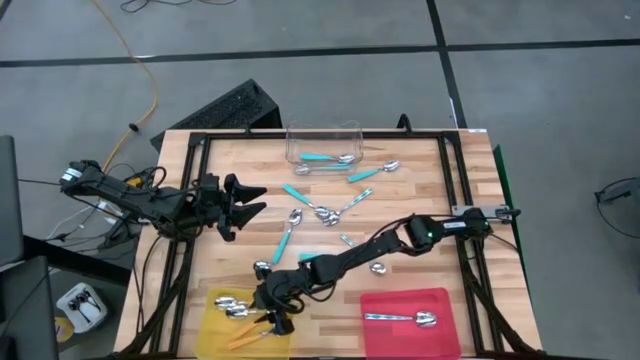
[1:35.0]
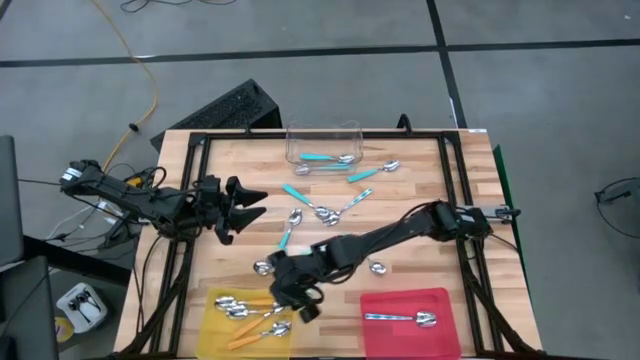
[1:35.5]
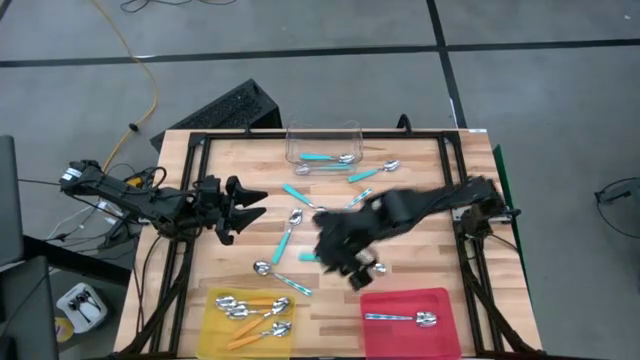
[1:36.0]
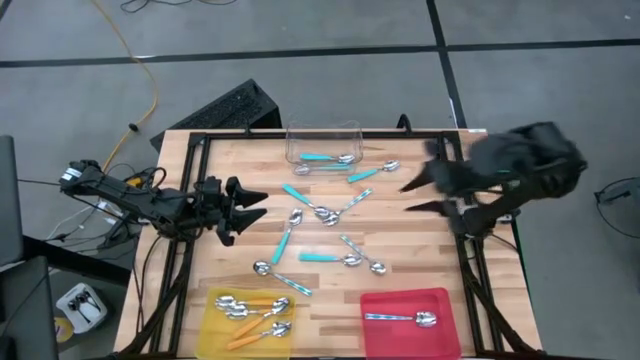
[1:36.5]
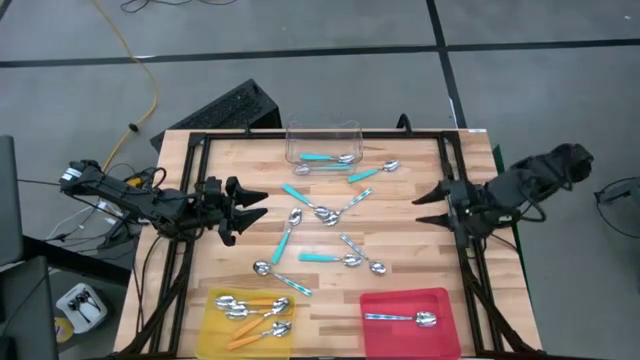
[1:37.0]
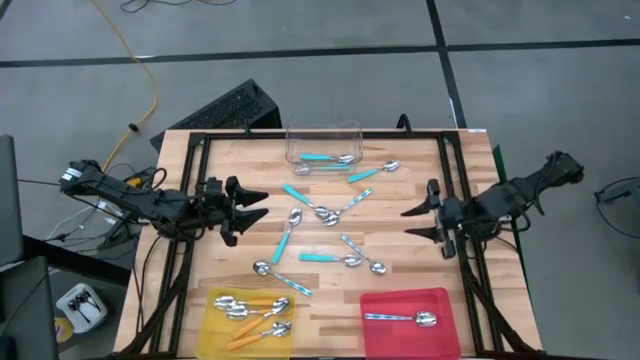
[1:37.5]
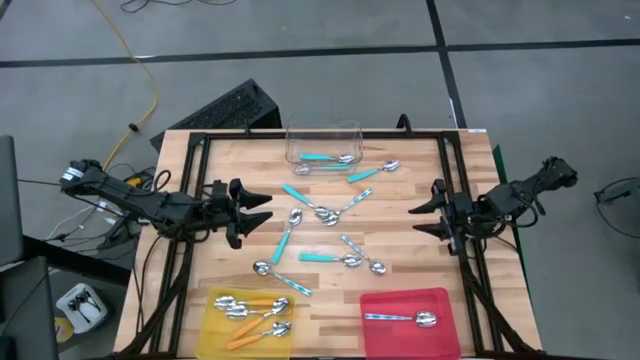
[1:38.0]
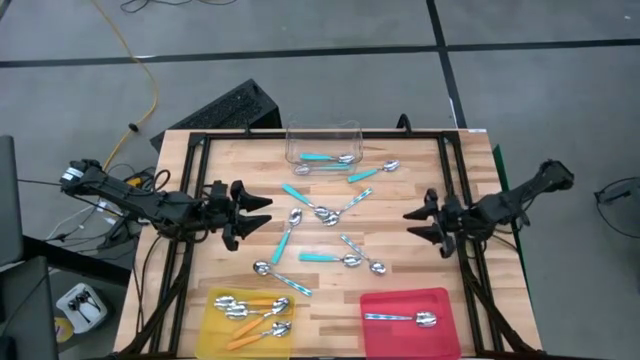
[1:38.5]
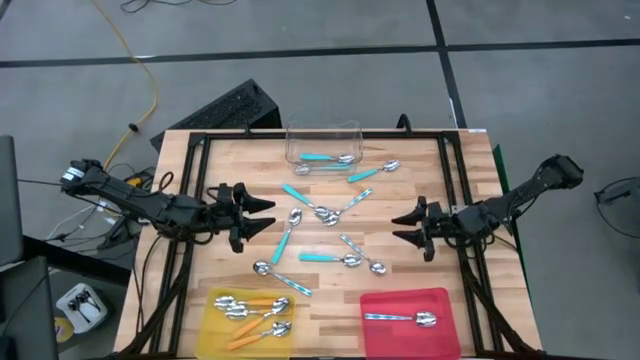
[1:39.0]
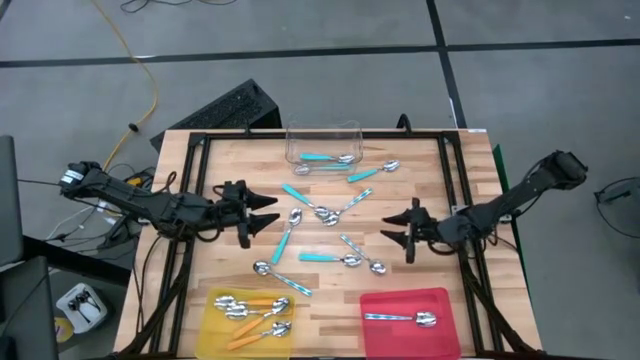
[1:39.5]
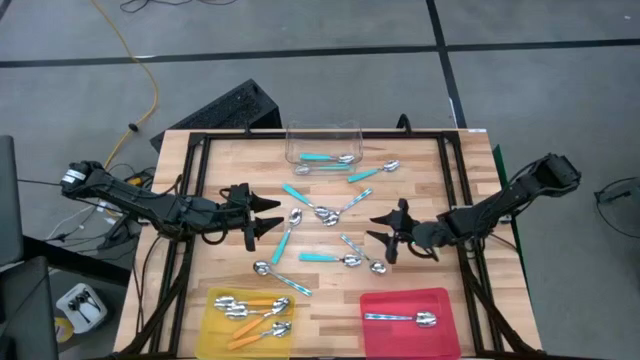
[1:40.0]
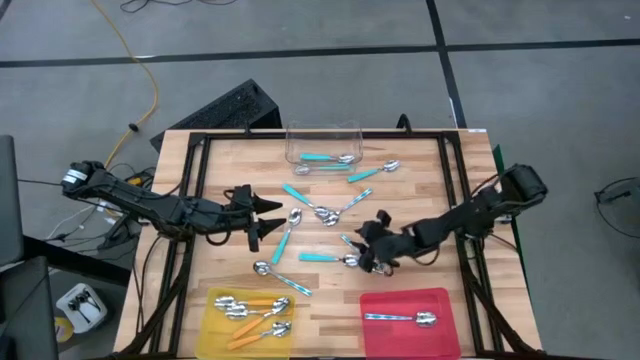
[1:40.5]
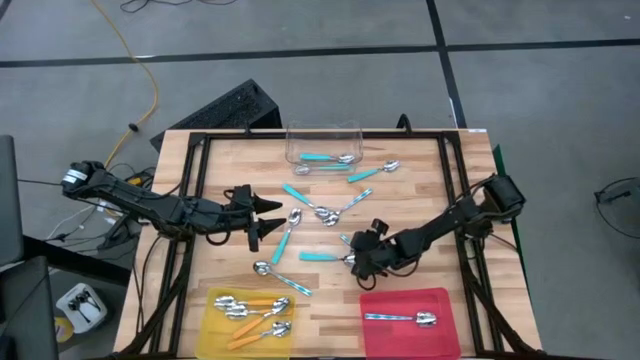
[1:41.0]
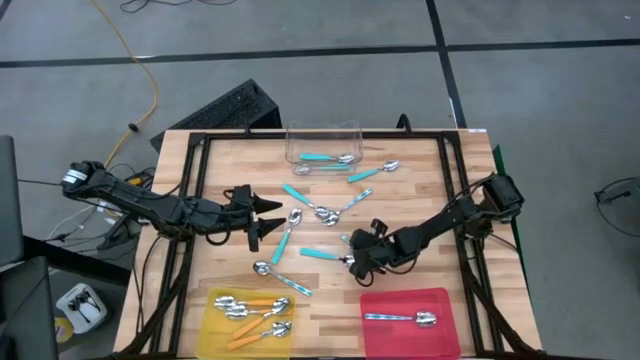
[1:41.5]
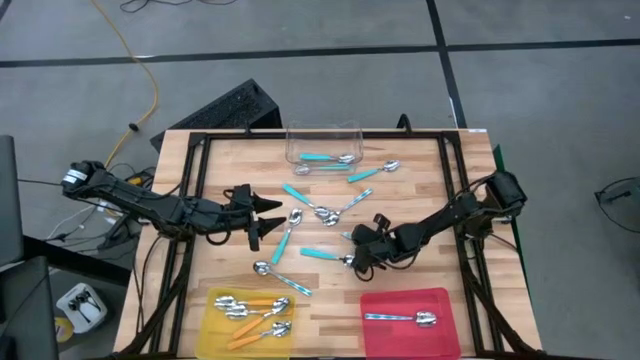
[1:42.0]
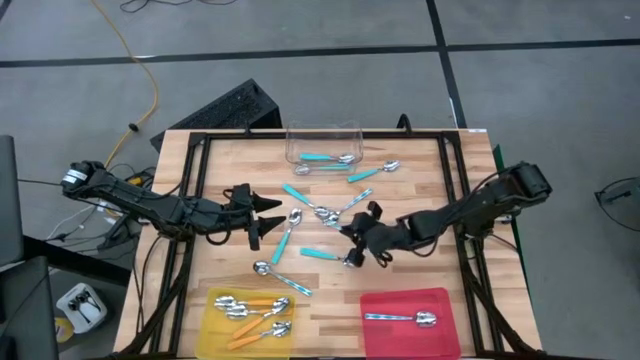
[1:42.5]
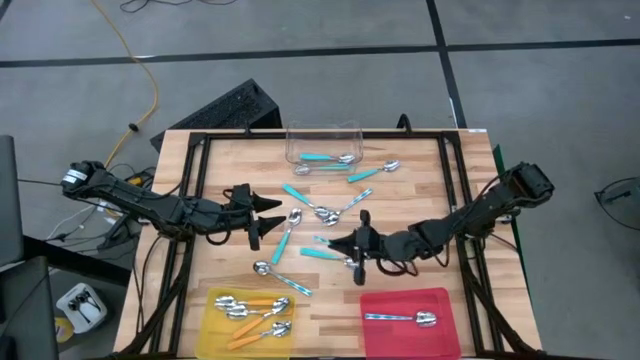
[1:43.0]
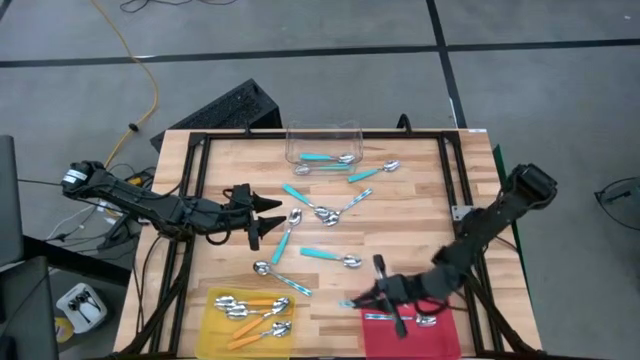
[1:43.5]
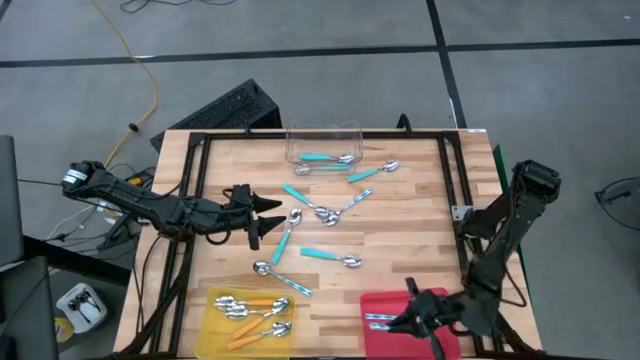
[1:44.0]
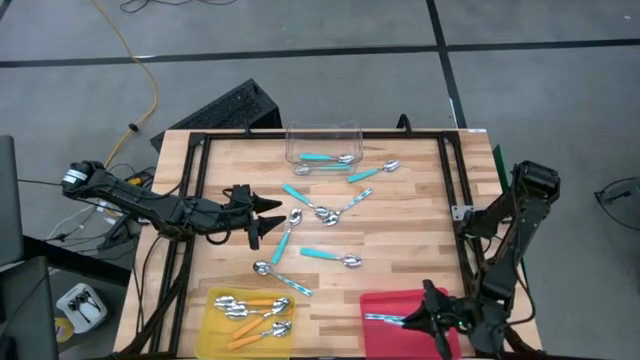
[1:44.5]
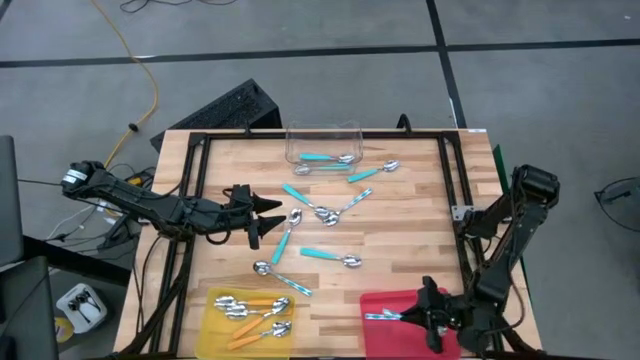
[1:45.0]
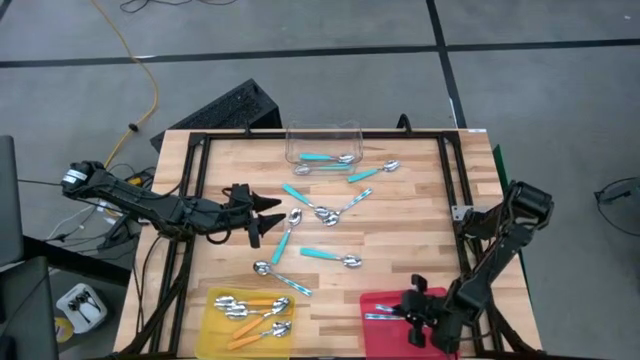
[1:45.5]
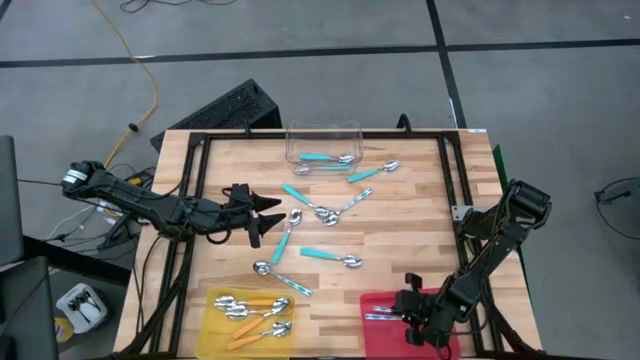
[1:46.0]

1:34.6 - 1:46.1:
Task: Sort silverware by color (type)
Put the white and blue spoon into the red bin

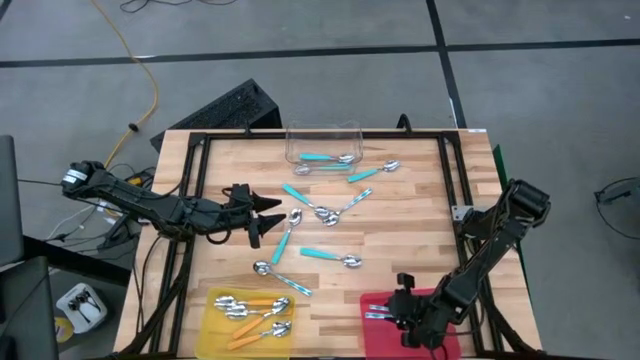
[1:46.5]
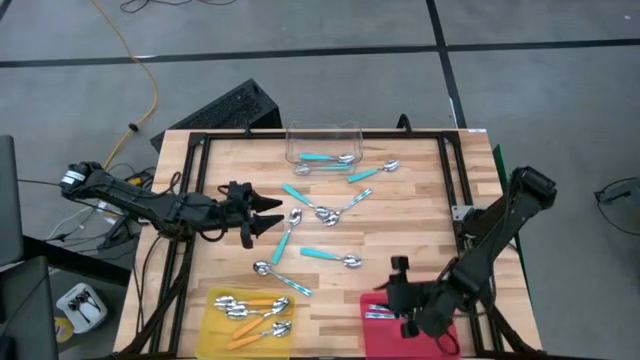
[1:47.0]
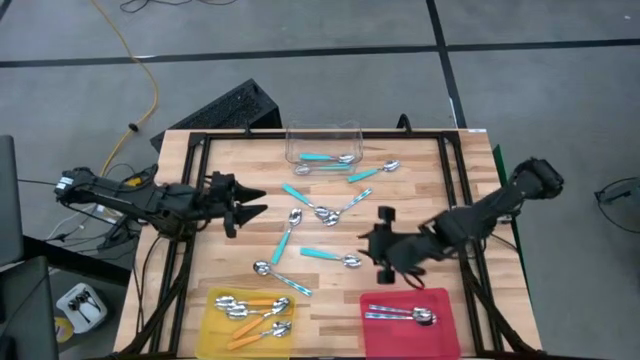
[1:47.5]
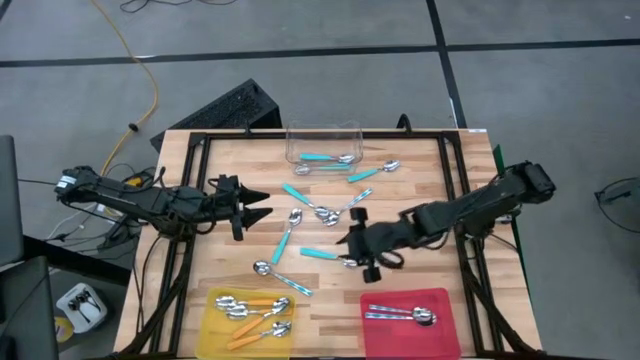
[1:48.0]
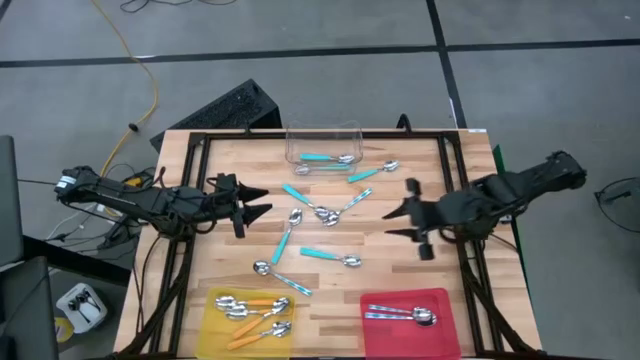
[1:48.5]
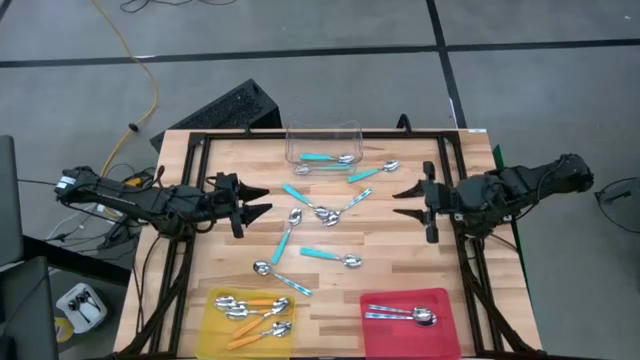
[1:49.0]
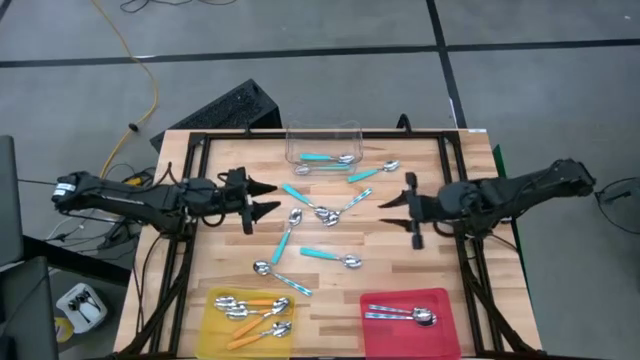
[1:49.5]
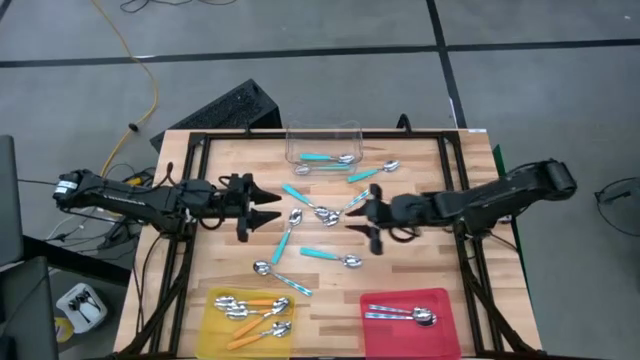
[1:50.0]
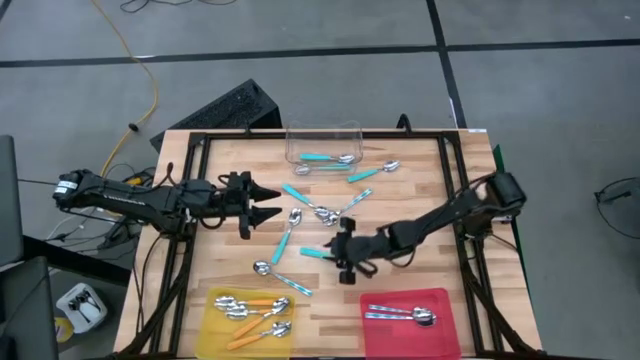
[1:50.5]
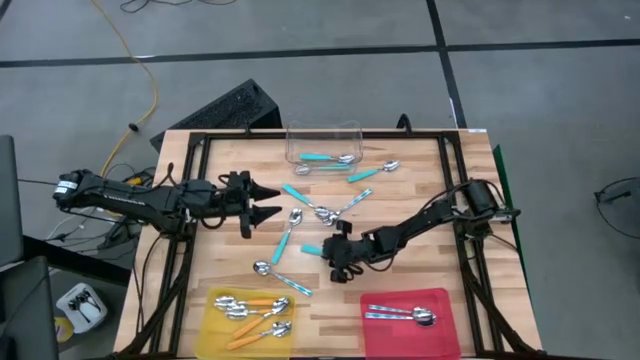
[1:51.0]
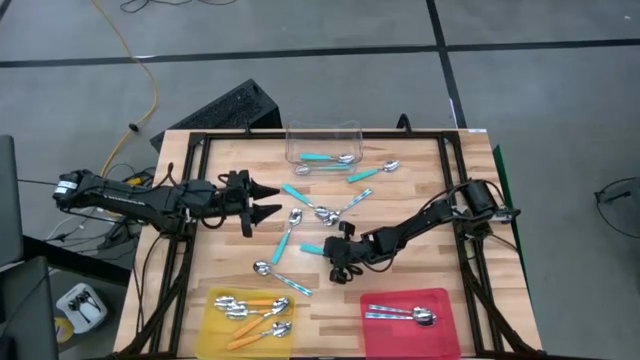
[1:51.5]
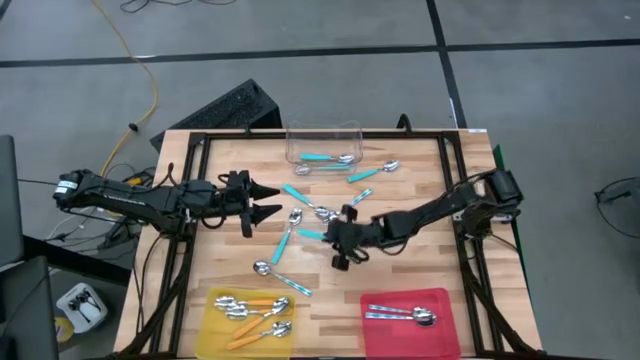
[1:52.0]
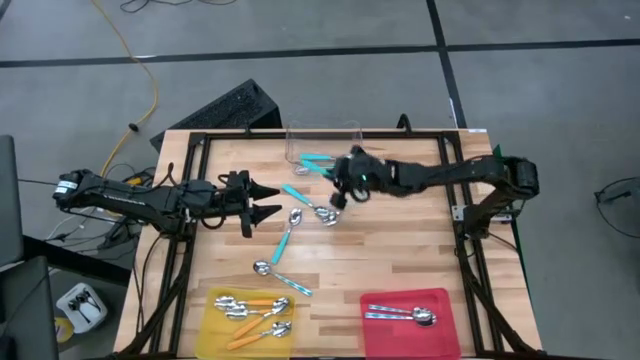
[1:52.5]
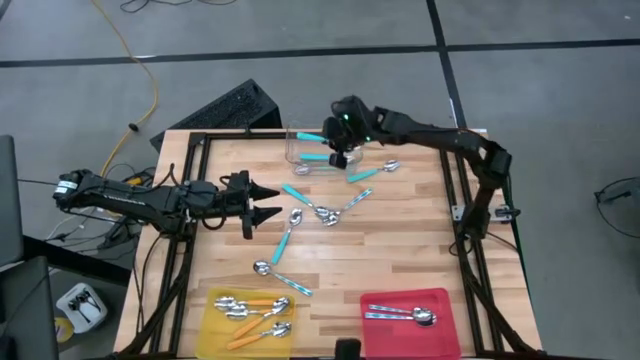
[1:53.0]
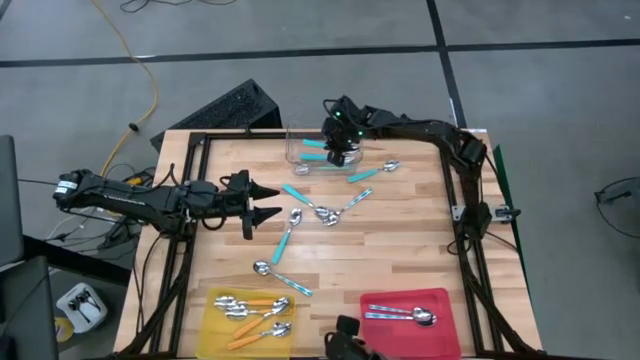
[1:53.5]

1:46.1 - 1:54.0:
Put the blue spoon into the transparent bin
